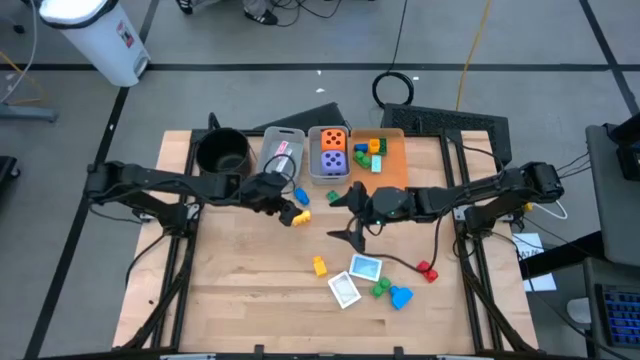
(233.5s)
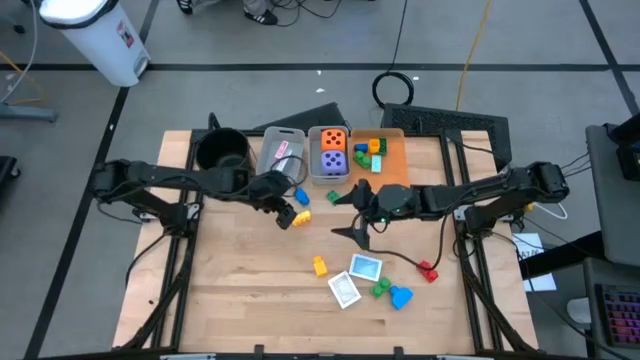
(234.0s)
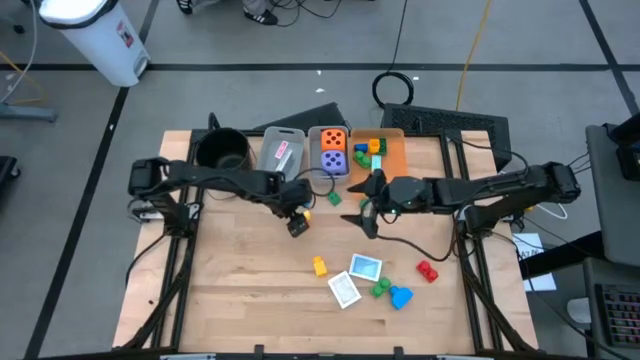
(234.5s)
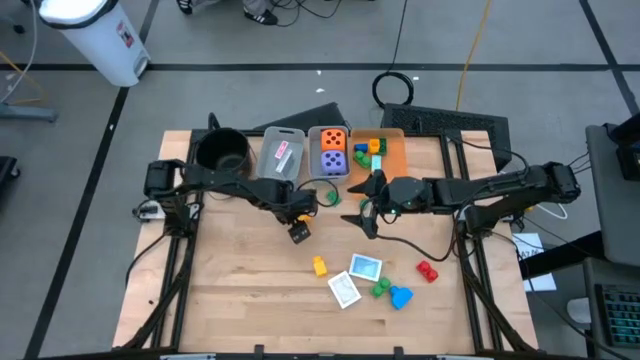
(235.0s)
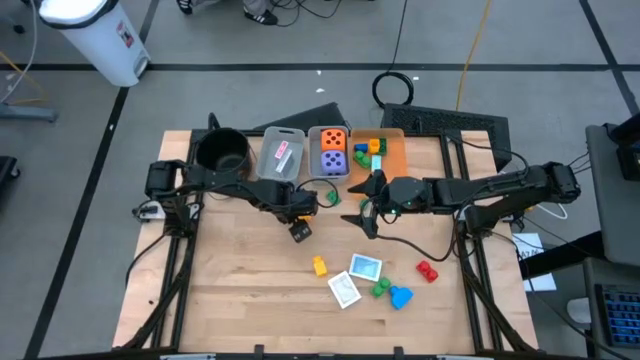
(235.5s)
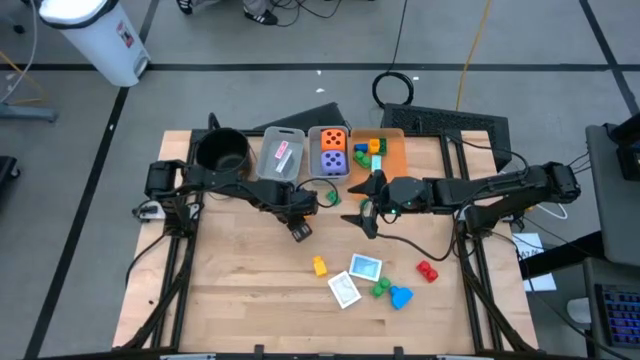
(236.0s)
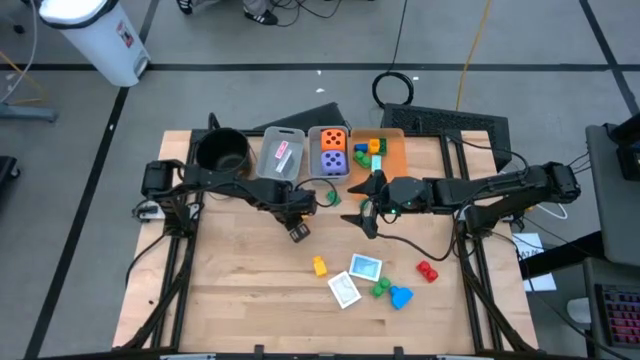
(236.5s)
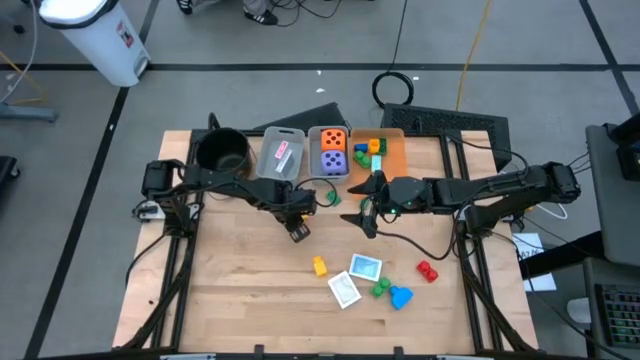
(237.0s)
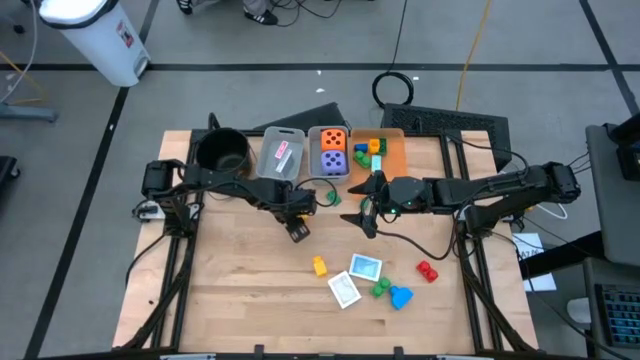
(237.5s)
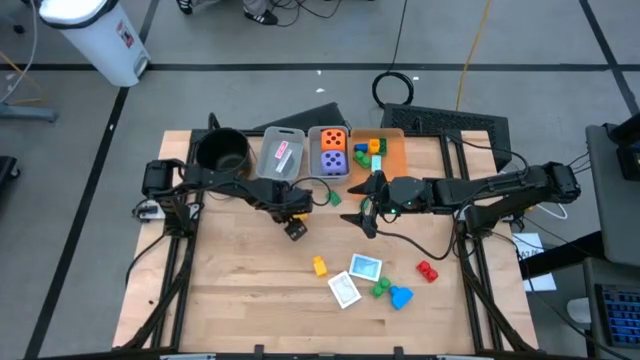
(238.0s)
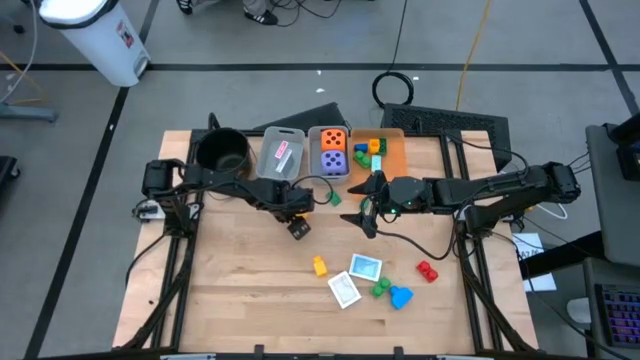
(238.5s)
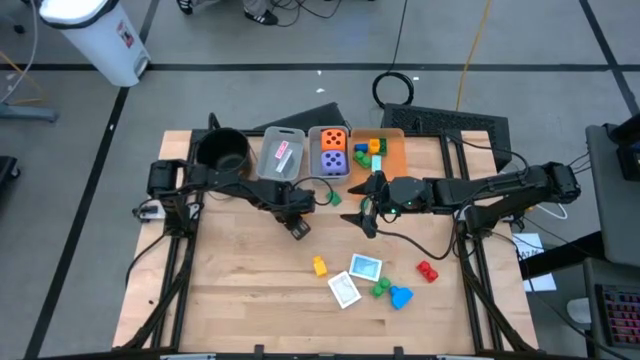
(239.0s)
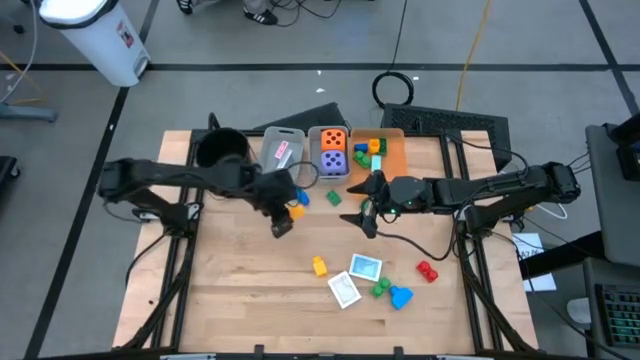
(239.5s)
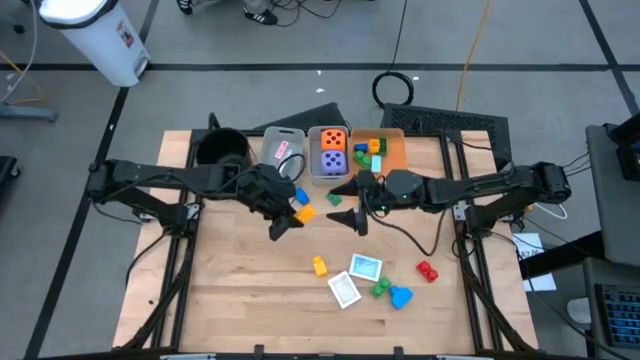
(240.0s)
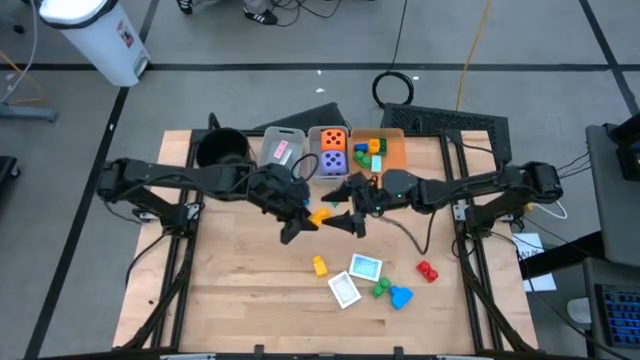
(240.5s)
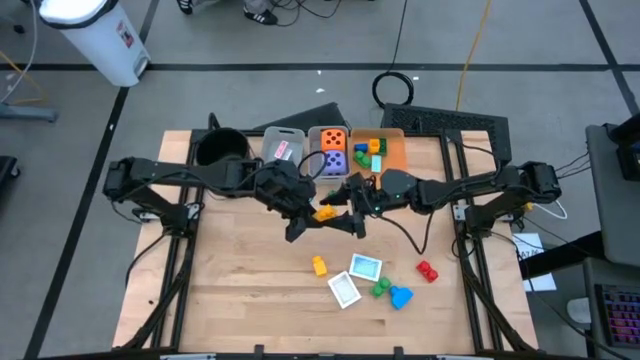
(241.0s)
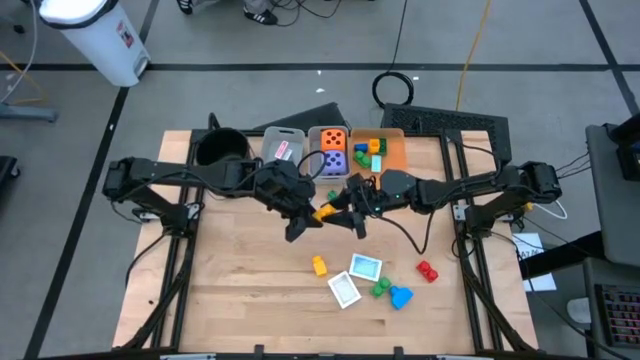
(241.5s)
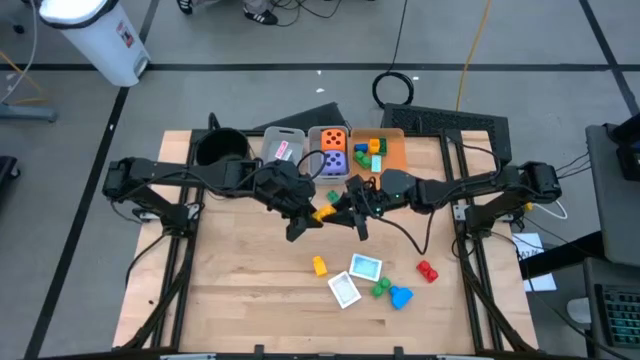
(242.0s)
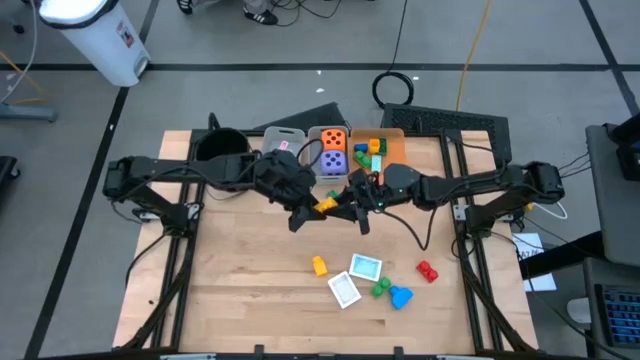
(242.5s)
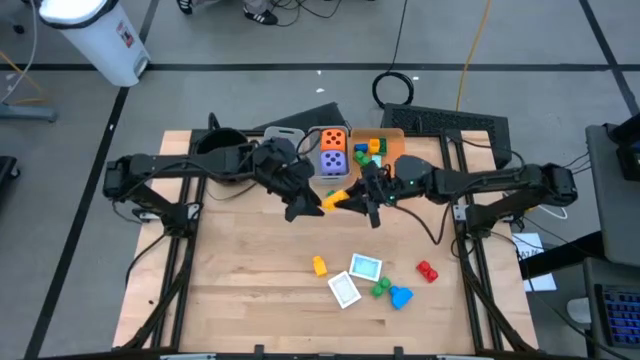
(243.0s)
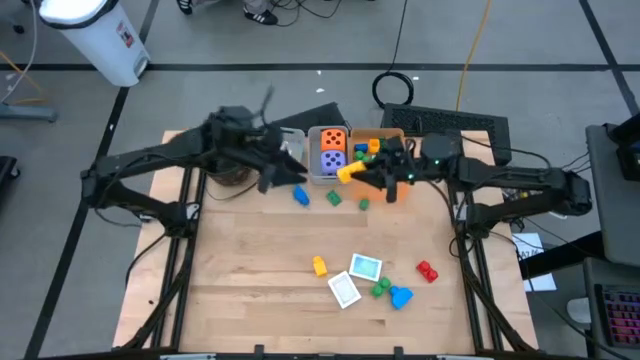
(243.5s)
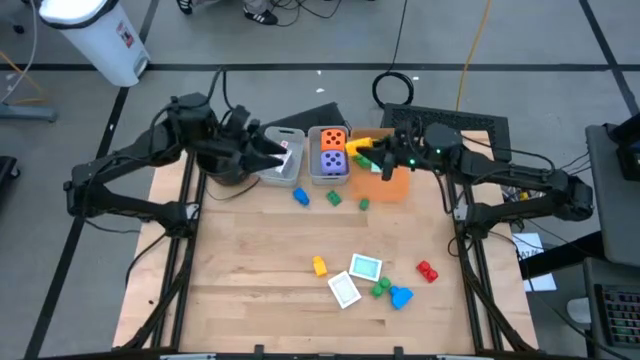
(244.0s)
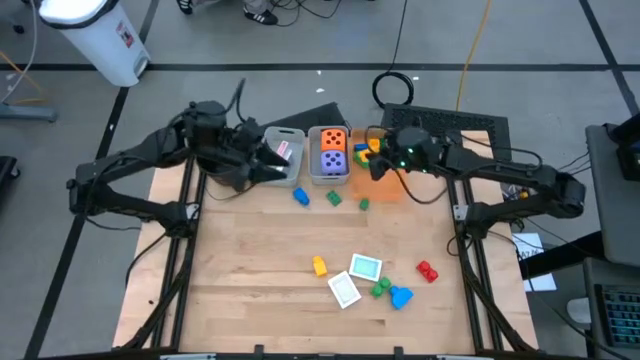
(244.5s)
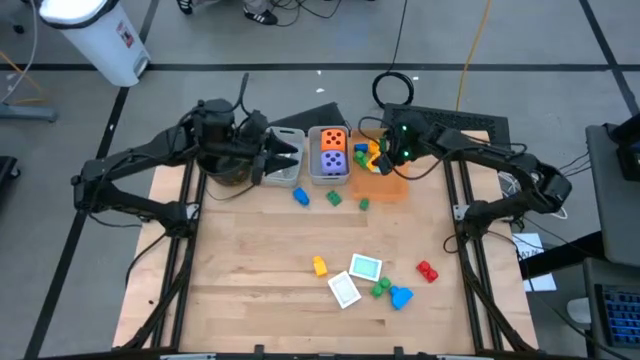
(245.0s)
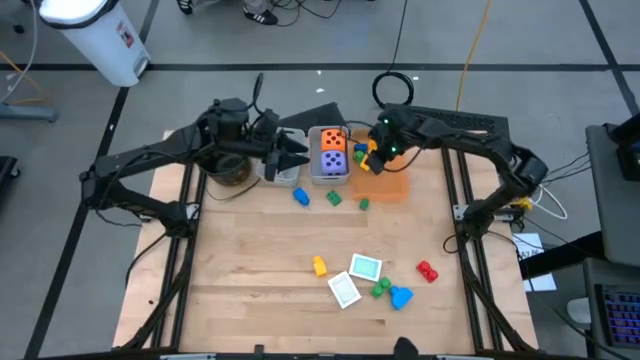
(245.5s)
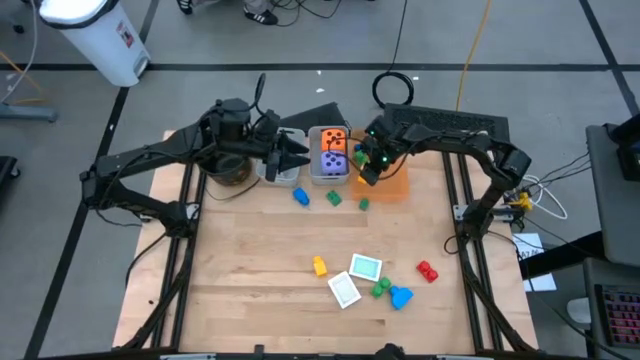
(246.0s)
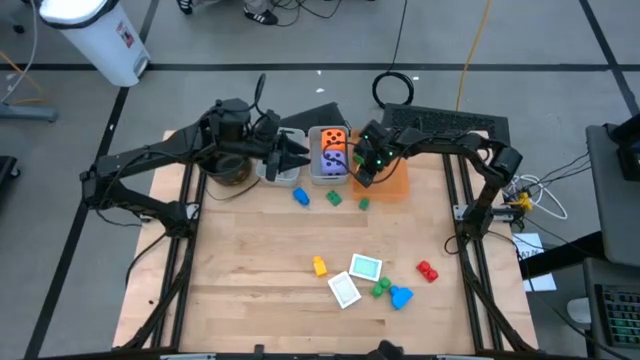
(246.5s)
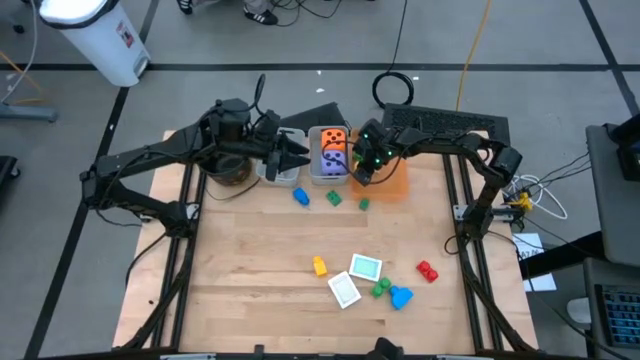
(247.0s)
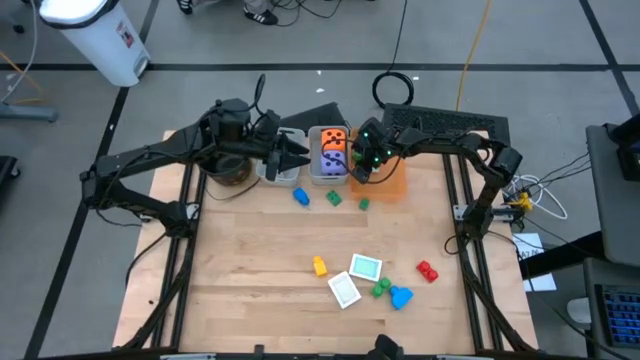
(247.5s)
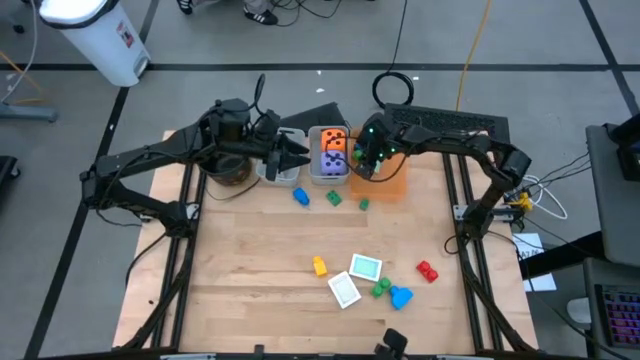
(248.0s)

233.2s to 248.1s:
Task: Pick & Place Toys
Put the top yellow game piece into the orange bin
